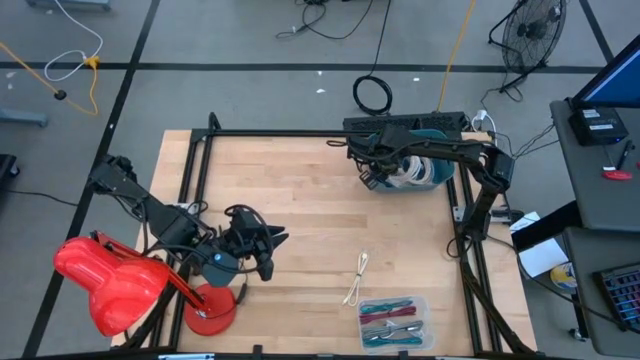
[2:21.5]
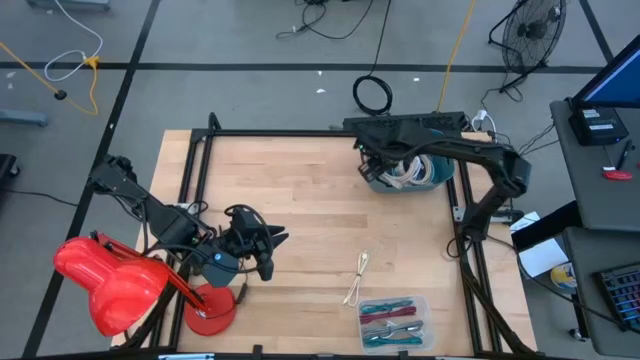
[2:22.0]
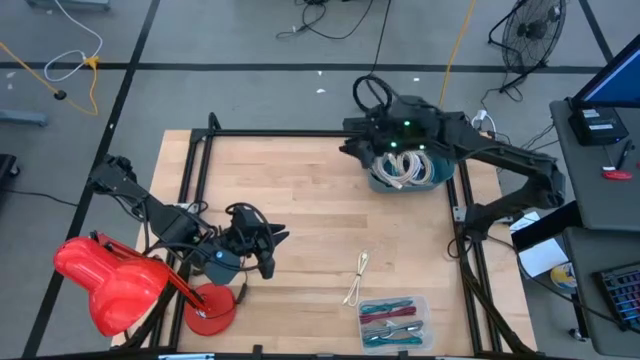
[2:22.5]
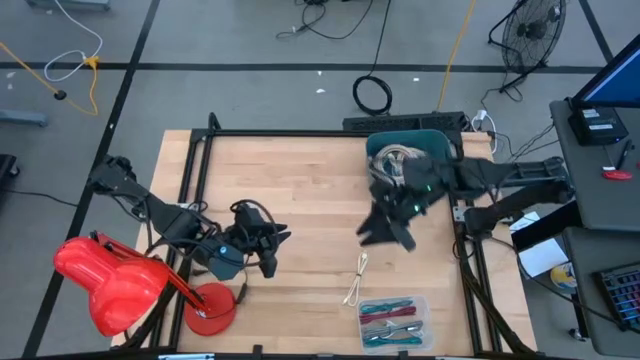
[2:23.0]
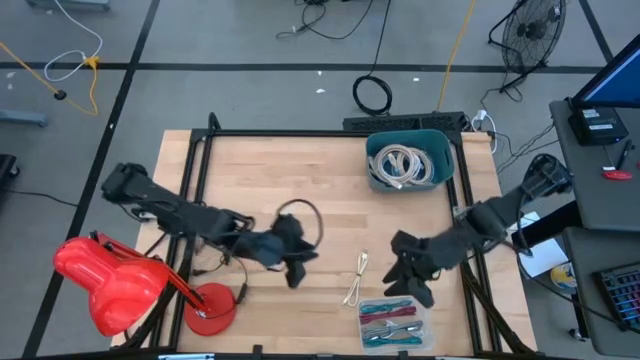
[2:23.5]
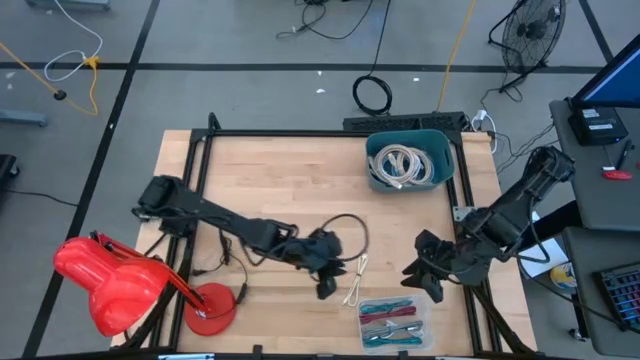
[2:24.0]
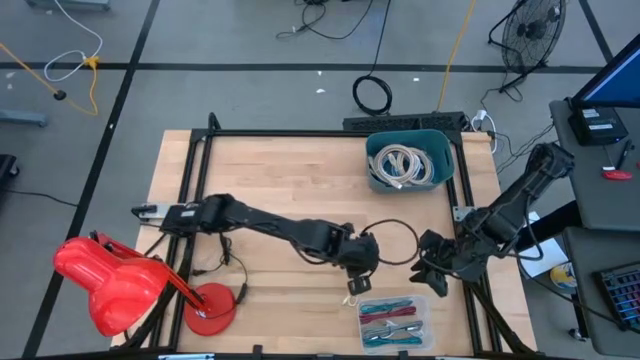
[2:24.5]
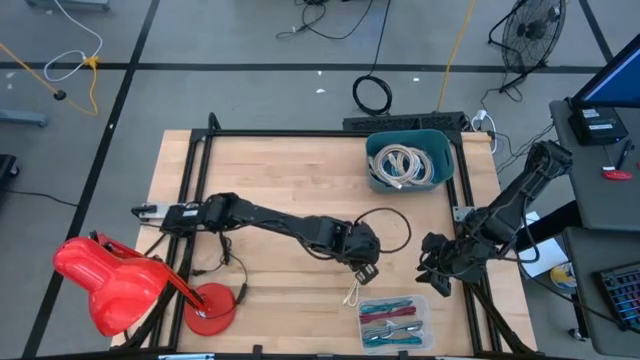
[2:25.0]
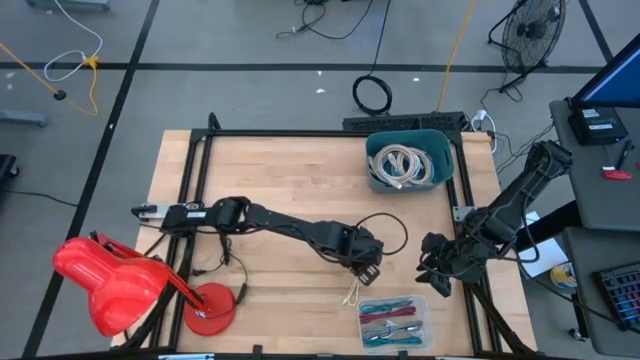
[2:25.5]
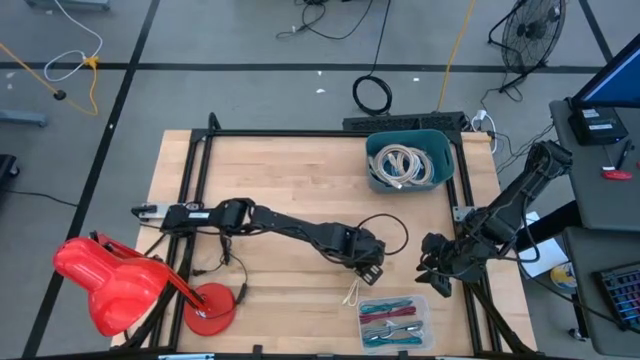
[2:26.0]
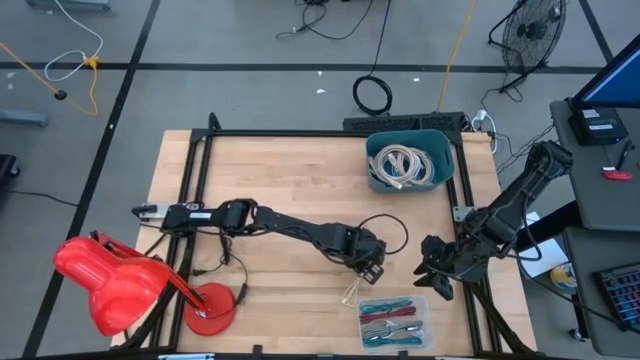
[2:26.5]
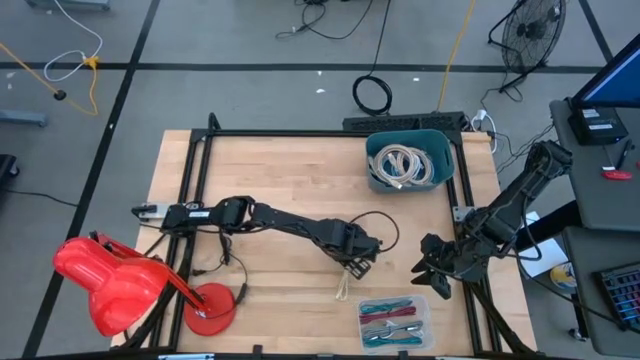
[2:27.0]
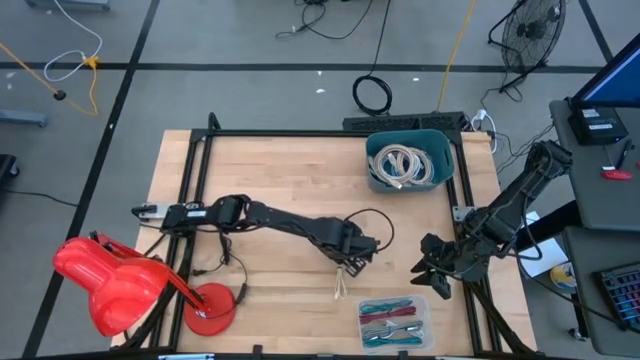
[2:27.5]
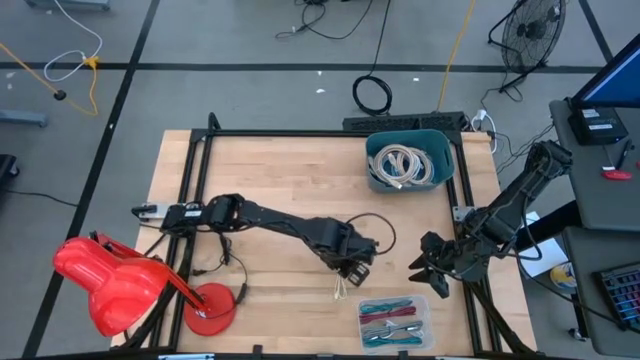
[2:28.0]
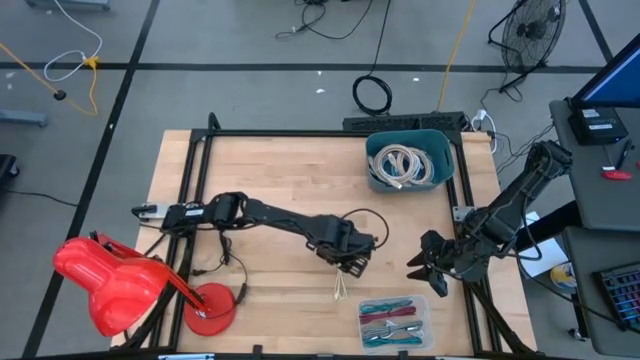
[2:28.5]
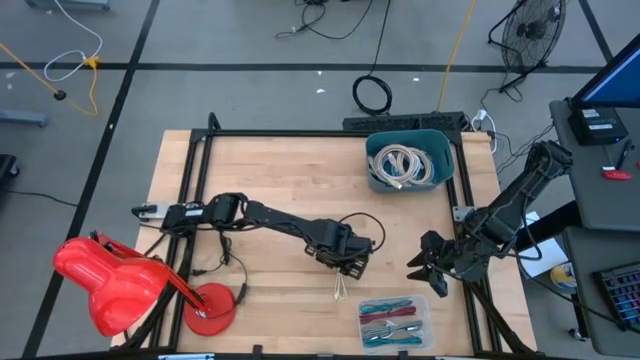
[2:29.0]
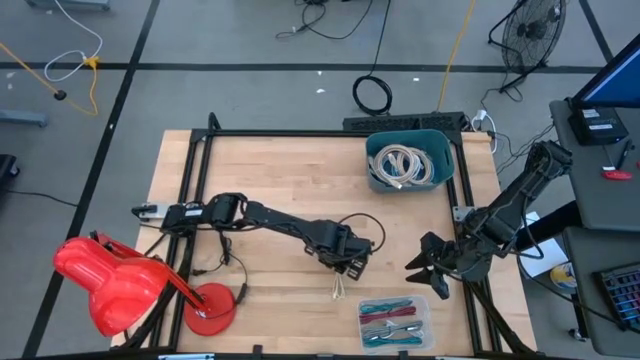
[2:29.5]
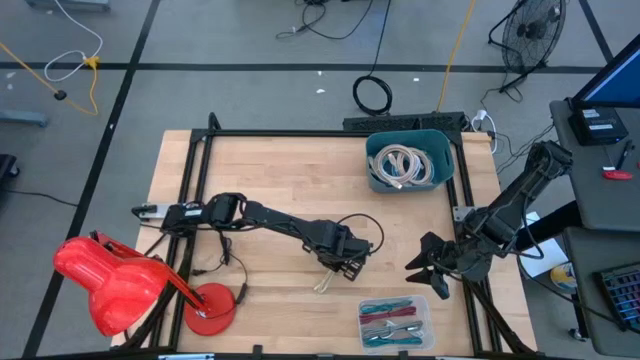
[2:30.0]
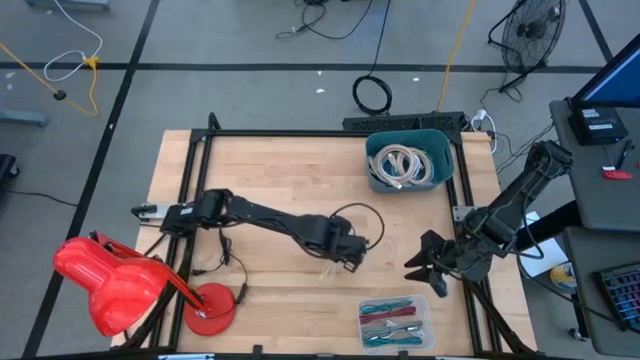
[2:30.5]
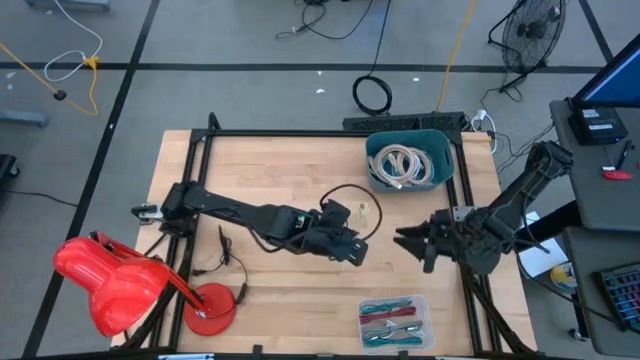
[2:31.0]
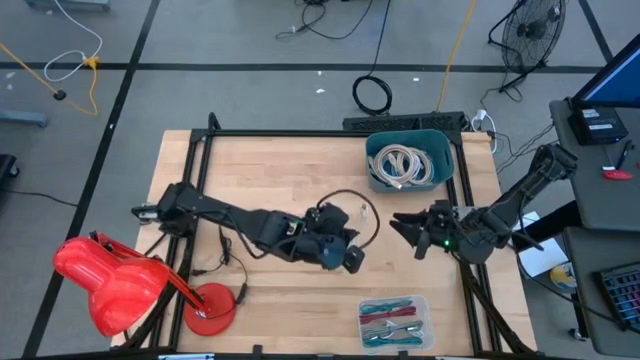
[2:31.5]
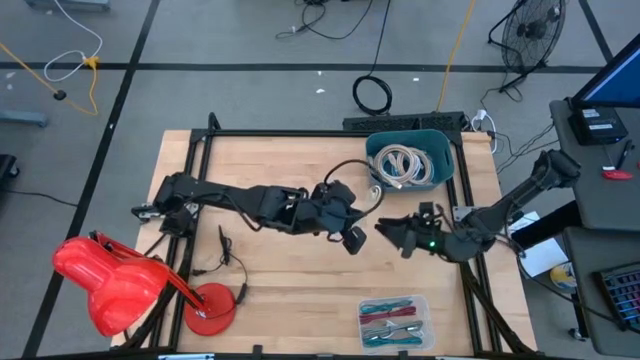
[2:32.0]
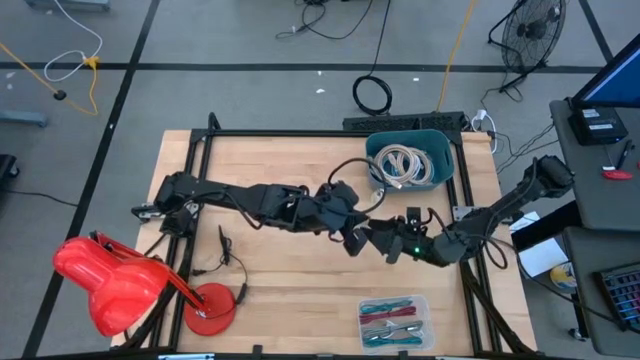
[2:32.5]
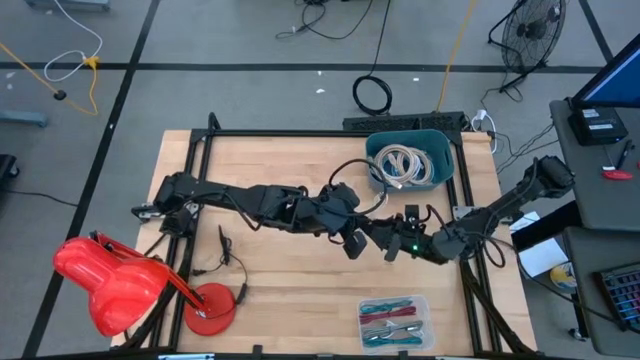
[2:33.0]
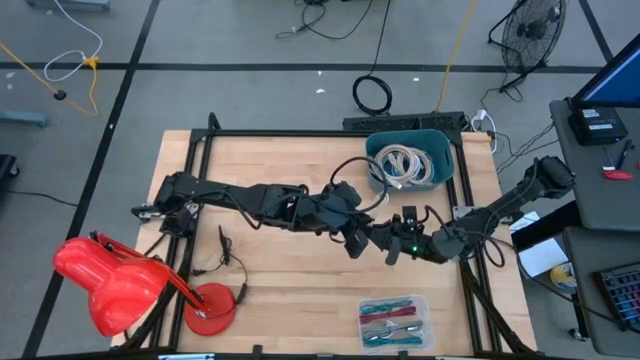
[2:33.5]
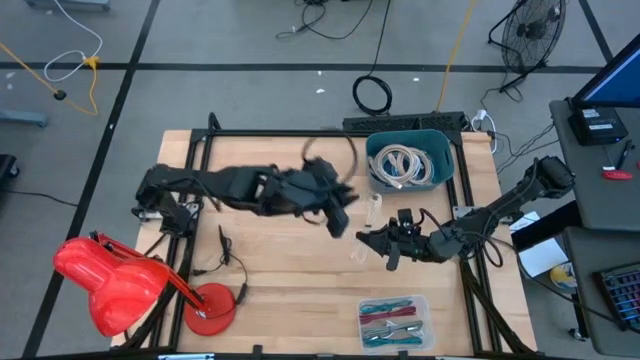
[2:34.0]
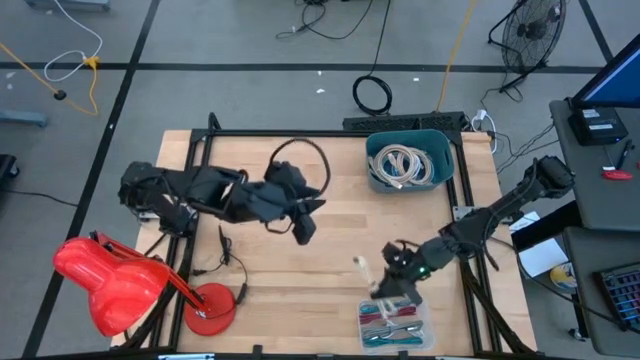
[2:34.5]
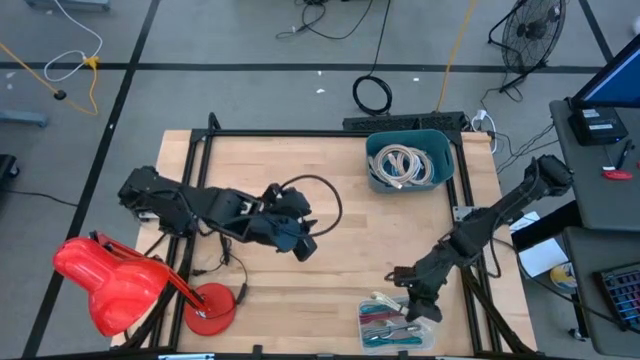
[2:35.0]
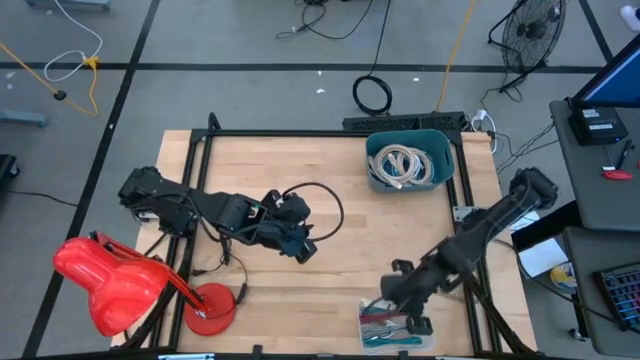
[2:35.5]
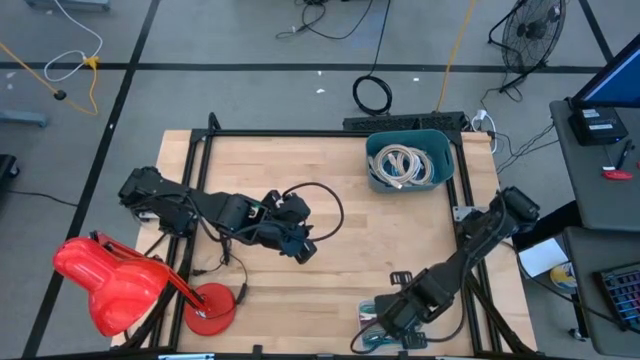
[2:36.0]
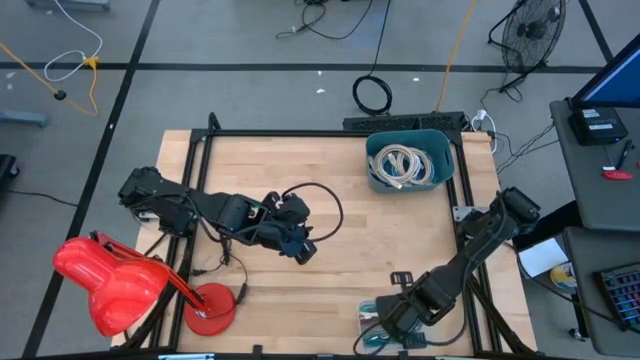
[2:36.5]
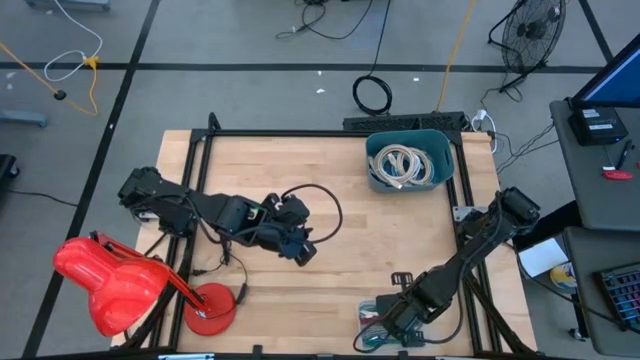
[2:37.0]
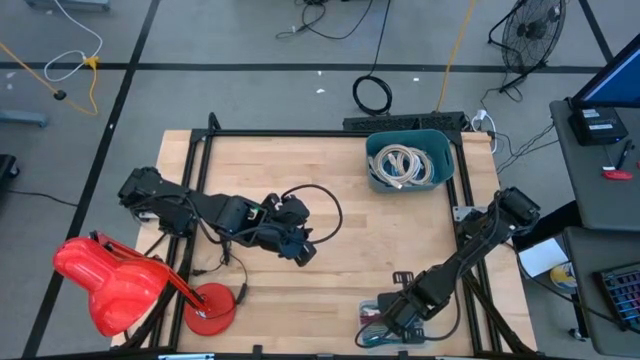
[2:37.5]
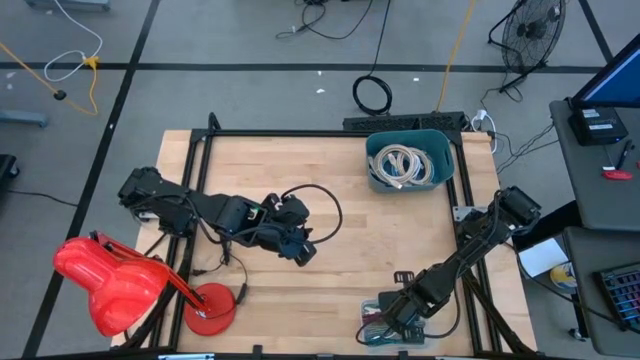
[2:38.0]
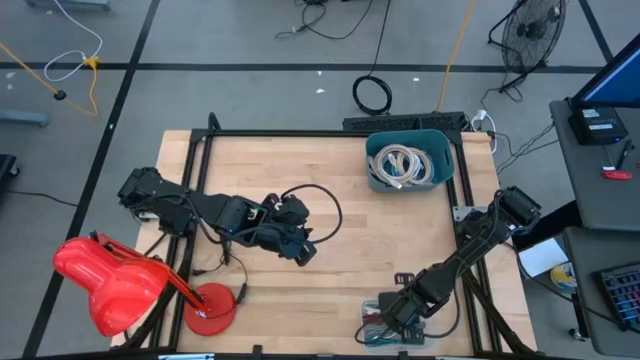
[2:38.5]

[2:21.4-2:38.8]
Task: Pick & Place USB Port
Put the brown charger cable into the transparent bin

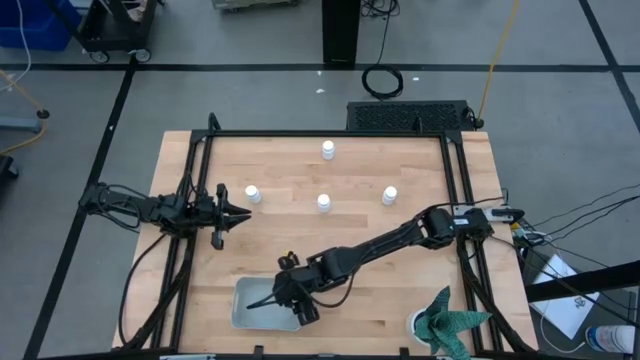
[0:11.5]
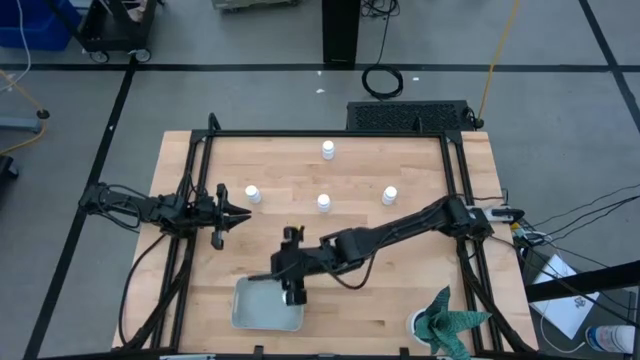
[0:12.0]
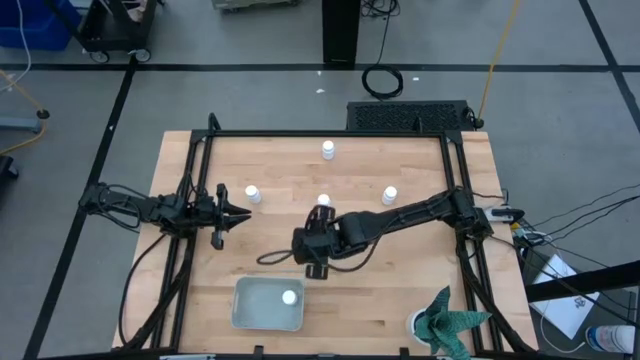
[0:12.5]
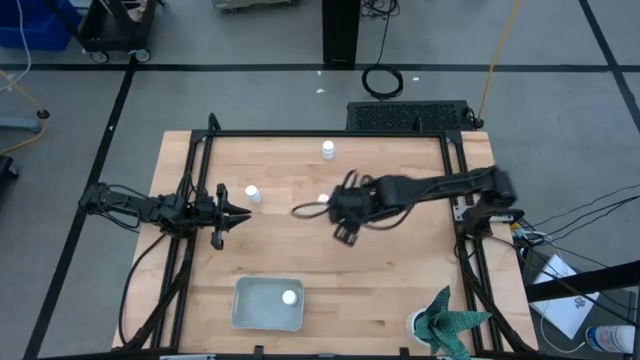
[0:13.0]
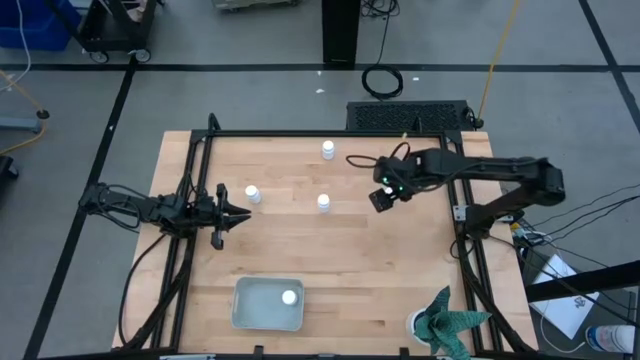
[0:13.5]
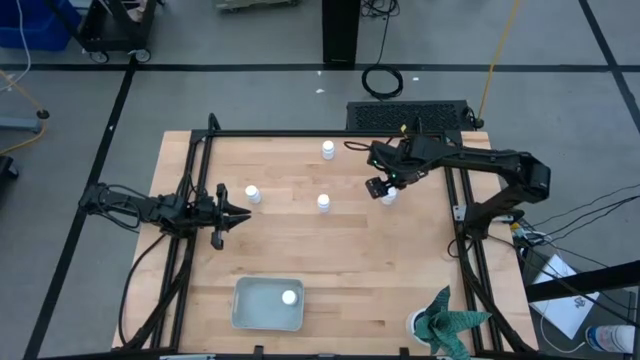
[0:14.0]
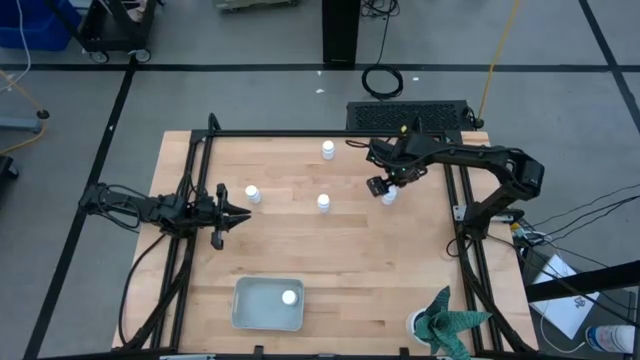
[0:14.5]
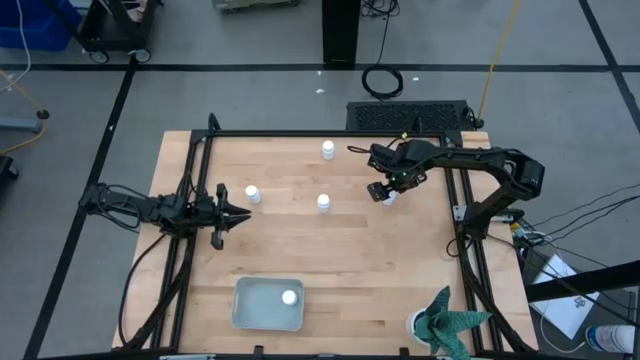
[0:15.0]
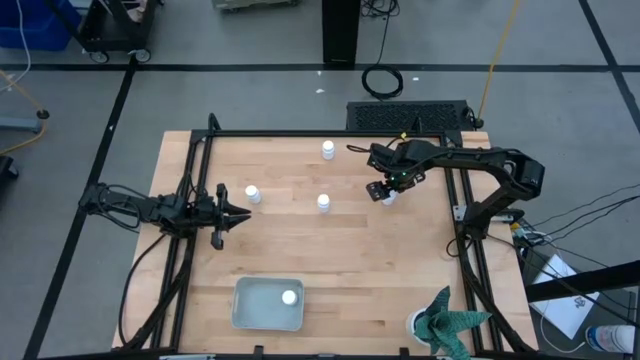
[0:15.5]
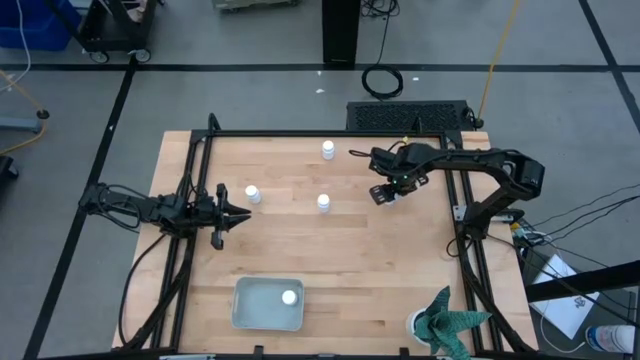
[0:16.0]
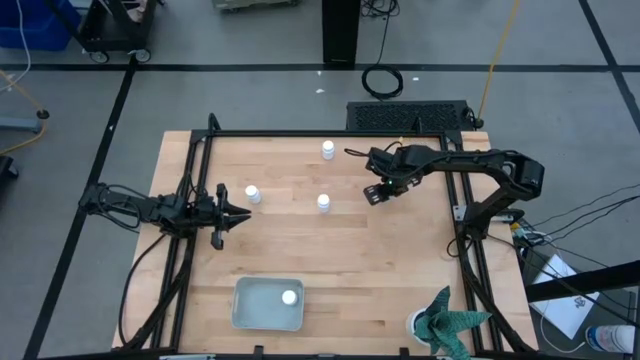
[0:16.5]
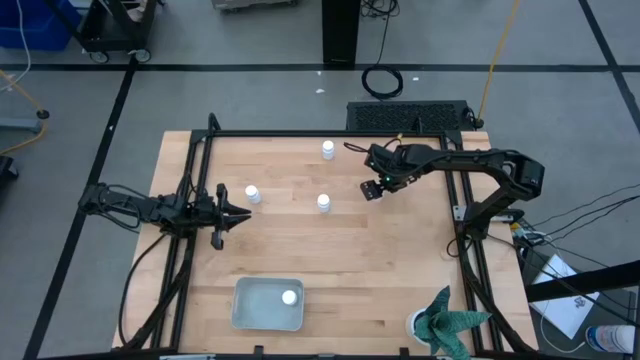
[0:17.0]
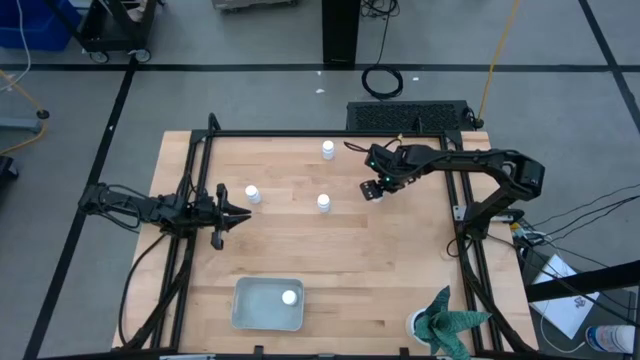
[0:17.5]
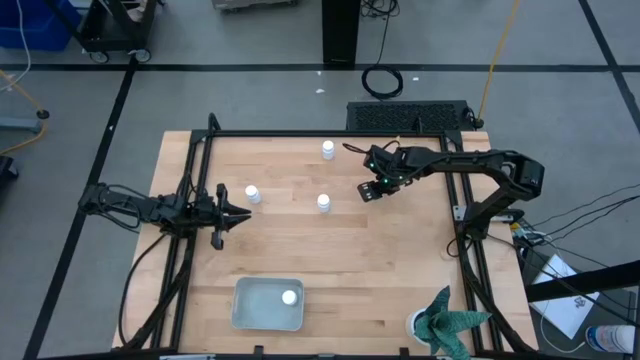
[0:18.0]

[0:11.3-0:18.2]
Task: Pick and place pill bottles into a basket
Put the white medicine bottle into the gray bin
